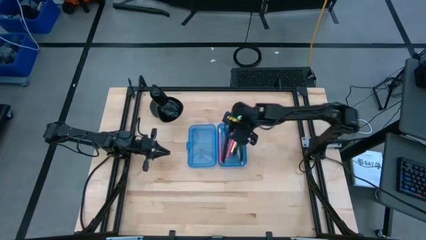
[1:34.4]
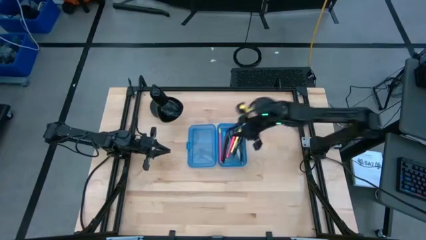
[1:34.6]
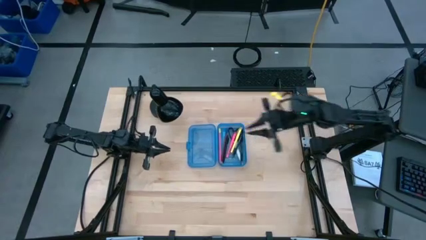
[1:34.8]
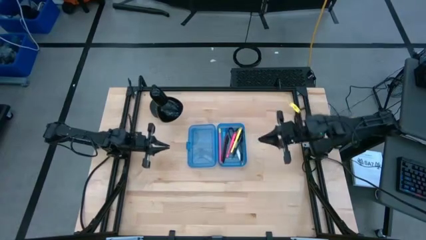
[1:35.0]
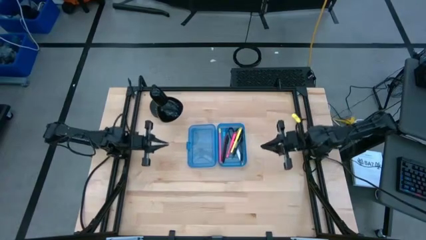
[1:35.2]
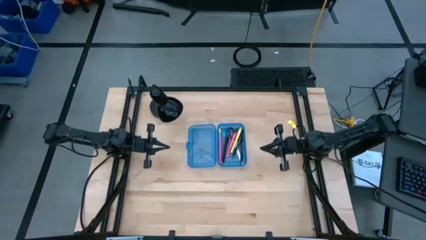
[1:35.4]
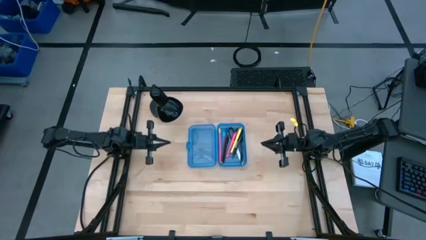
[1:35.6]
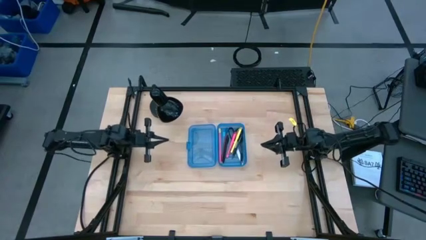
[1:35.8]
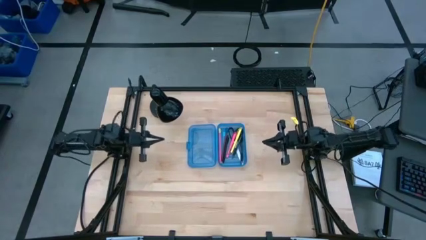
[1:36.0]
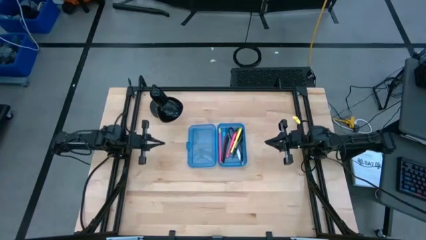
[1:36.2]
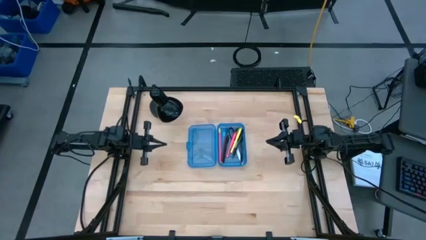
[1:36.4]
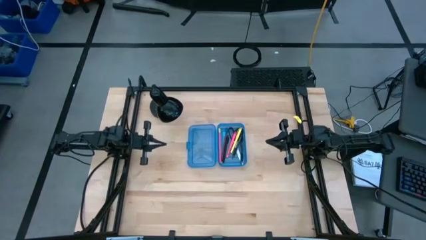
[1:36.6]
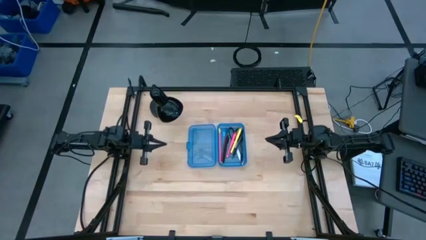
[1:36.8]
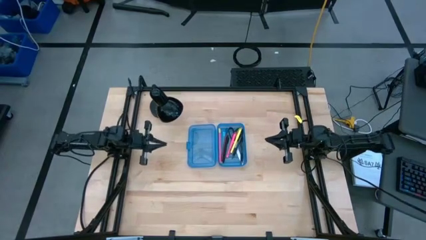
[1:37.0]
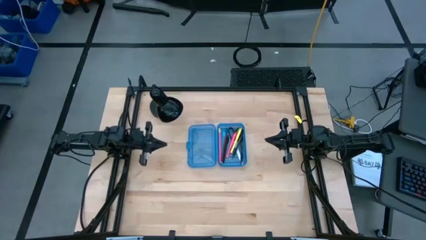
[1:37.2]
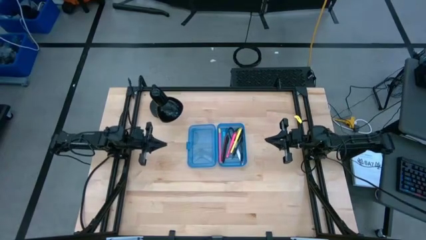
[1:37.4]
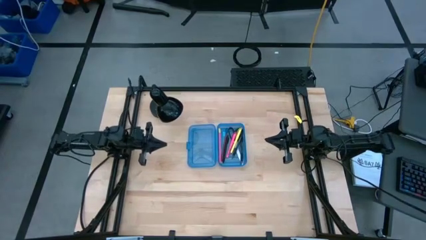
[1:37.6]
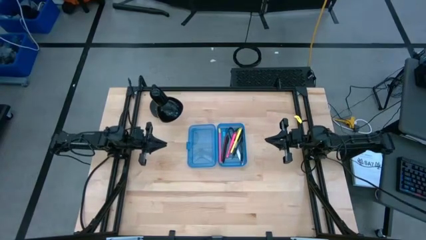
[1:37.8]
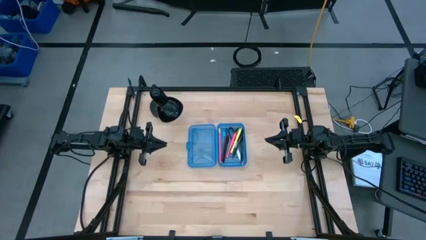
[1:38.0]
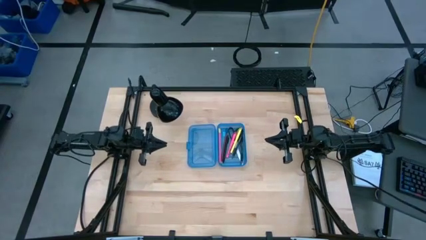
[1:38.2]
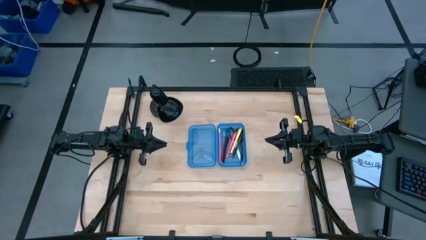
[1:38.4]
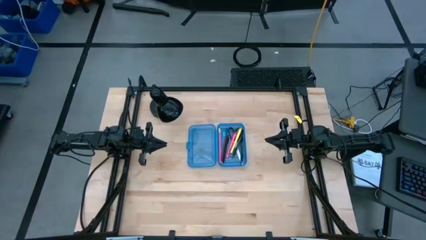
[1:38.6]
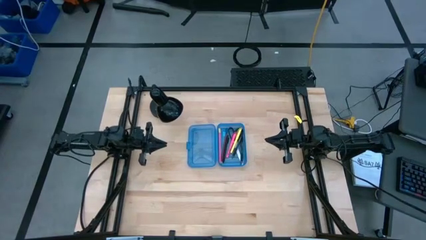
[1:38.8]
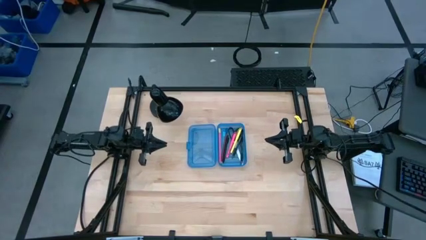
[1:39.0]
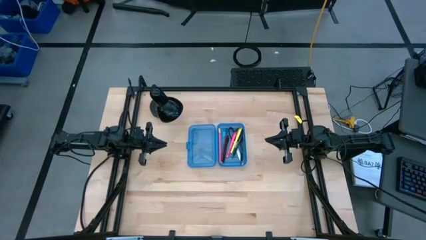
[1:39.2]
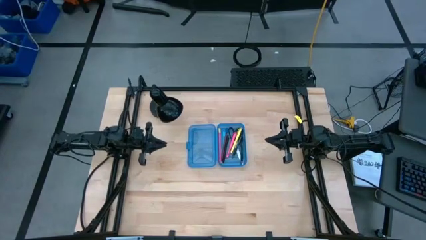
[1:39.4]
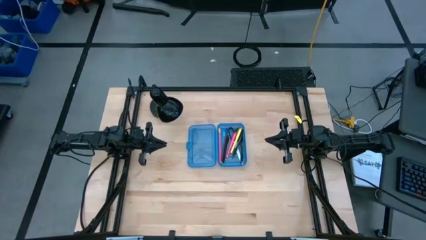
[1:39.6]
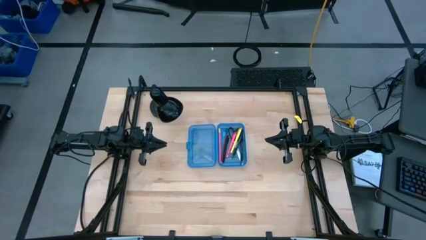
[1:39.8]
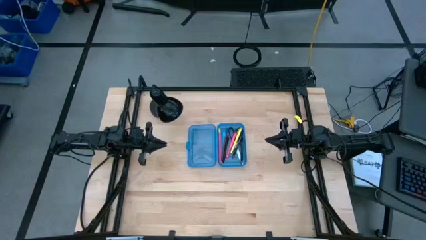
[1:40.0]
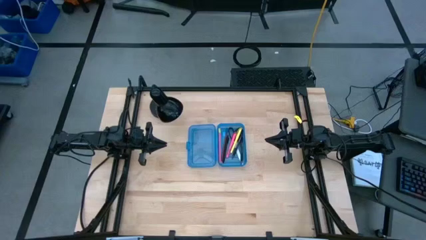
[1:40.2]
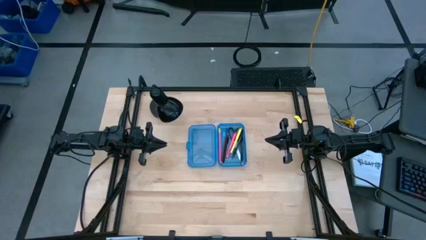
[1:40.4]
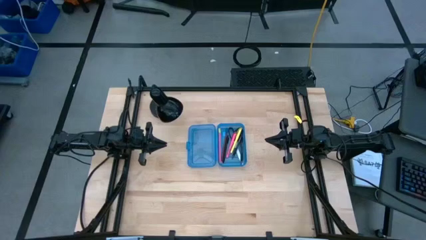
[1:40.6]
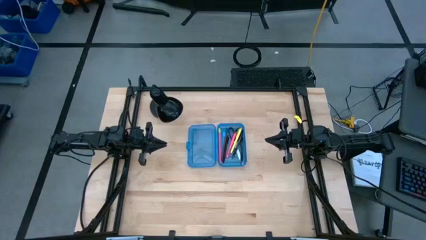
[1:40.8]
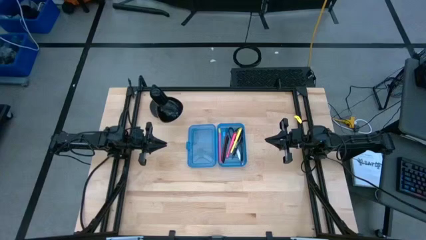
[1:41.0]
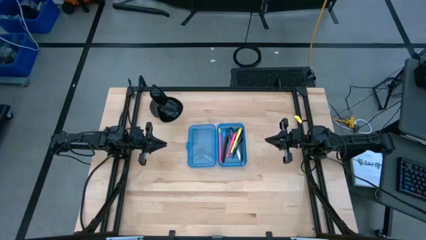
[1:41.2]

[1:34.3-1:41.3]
Task: Pick & place school supplies into a supply box
Return to Home Position

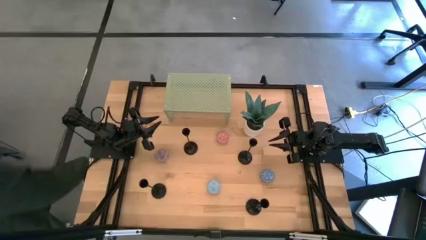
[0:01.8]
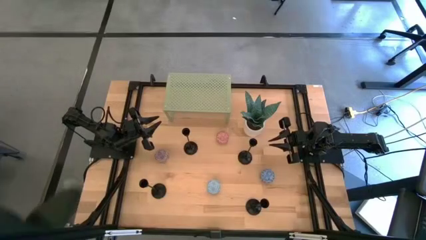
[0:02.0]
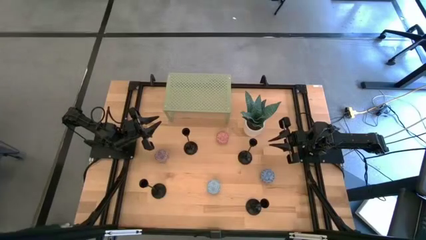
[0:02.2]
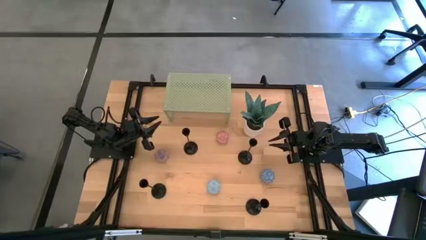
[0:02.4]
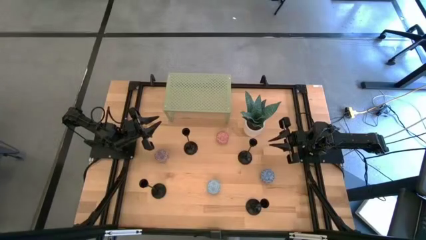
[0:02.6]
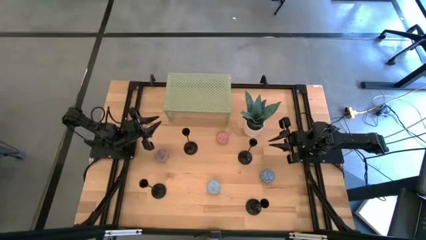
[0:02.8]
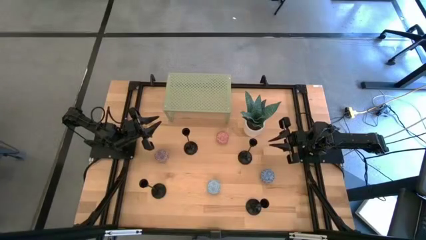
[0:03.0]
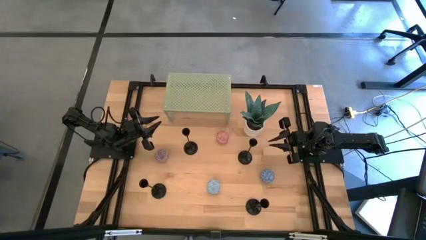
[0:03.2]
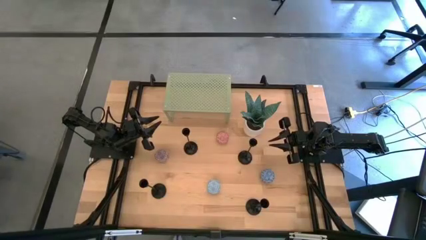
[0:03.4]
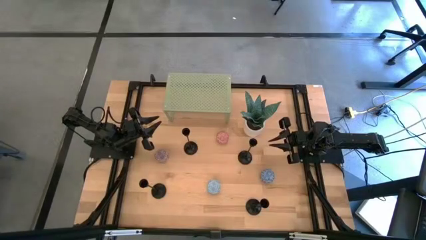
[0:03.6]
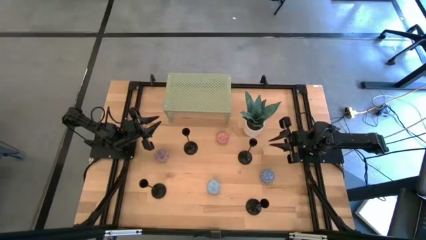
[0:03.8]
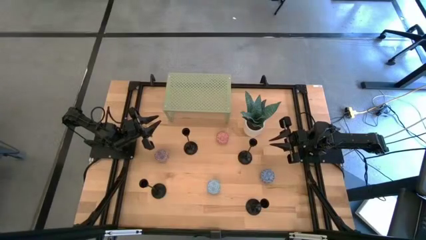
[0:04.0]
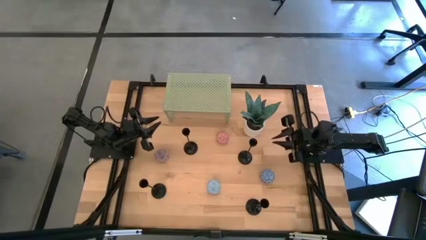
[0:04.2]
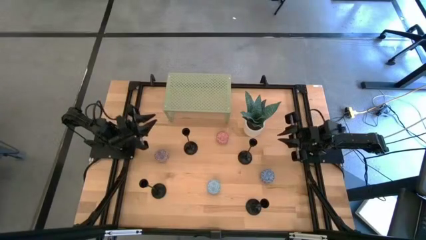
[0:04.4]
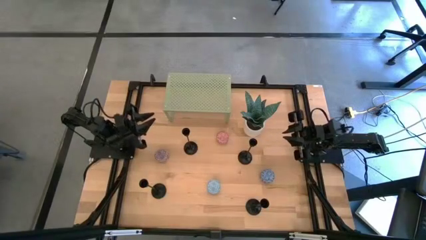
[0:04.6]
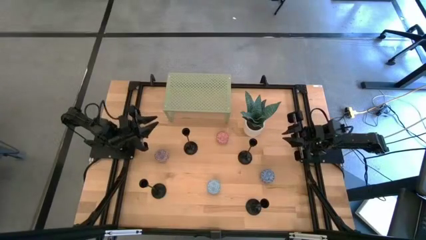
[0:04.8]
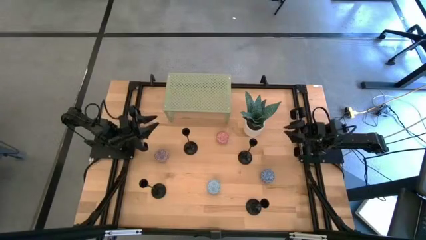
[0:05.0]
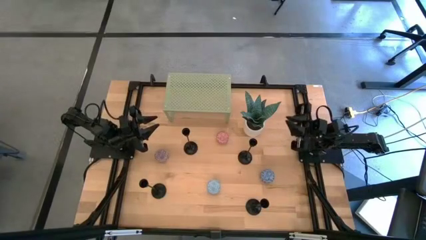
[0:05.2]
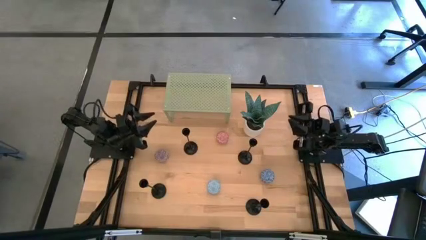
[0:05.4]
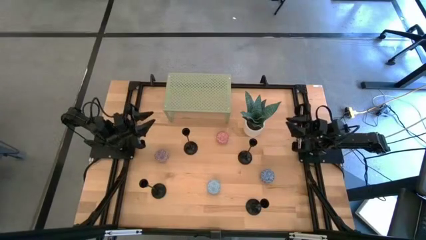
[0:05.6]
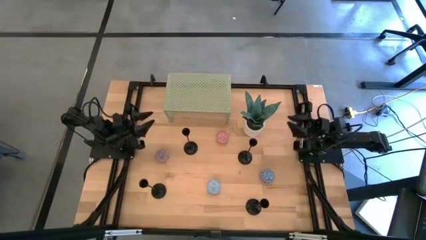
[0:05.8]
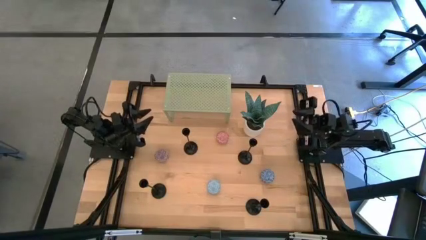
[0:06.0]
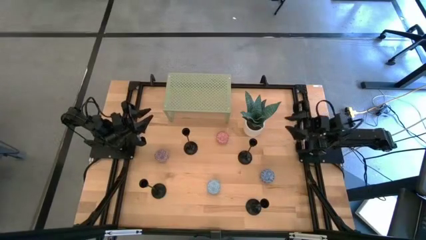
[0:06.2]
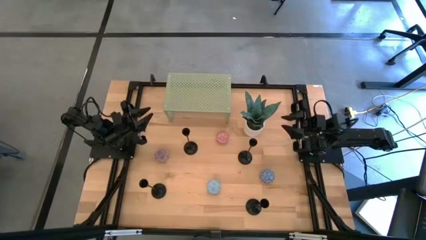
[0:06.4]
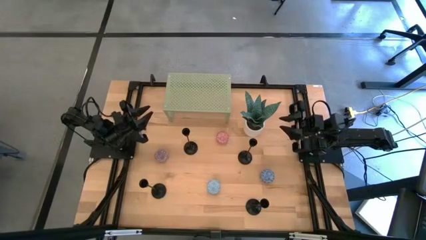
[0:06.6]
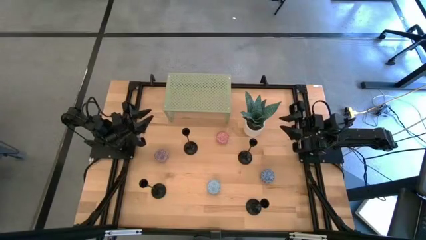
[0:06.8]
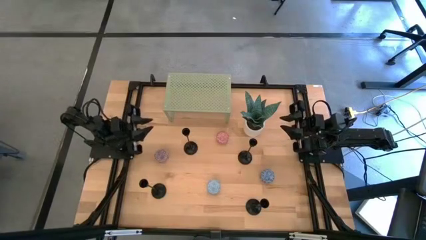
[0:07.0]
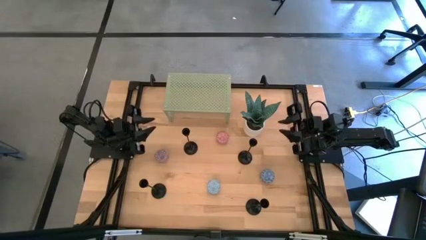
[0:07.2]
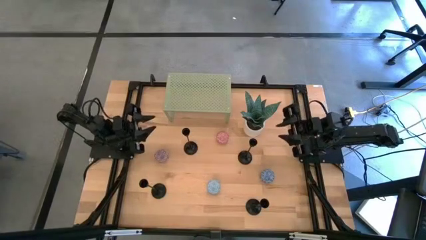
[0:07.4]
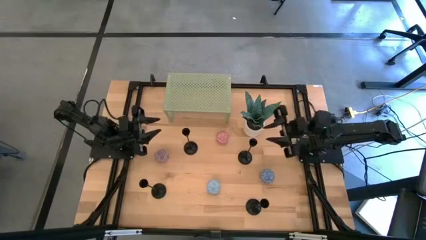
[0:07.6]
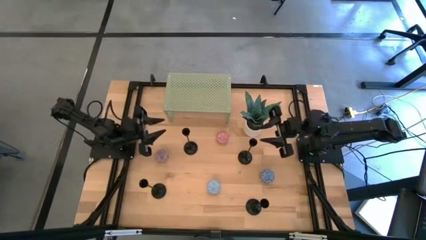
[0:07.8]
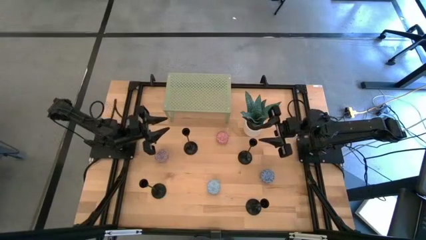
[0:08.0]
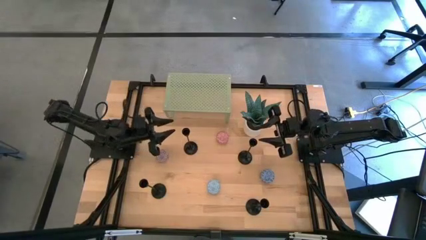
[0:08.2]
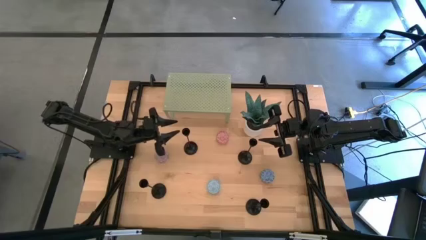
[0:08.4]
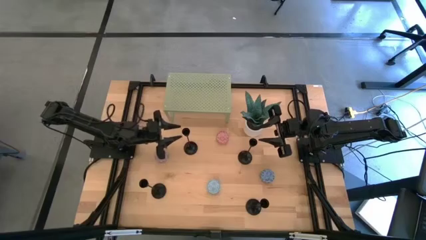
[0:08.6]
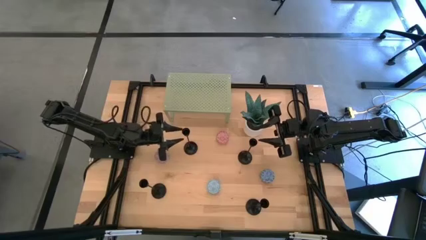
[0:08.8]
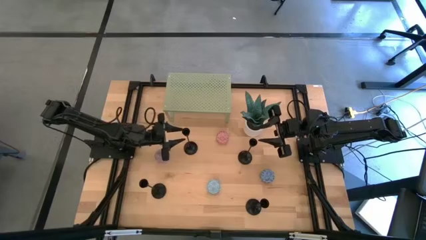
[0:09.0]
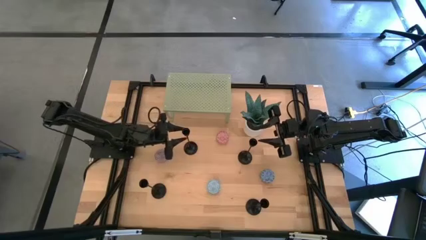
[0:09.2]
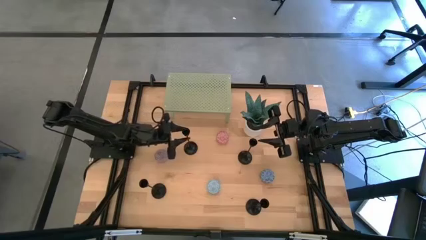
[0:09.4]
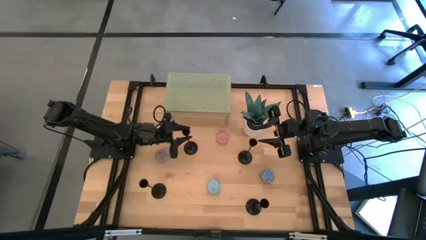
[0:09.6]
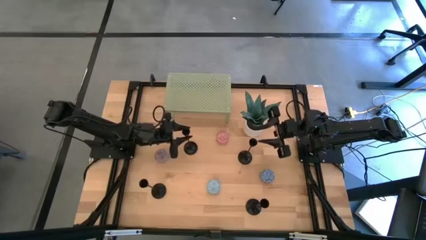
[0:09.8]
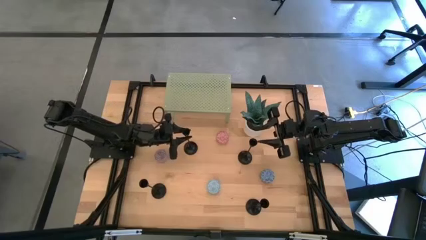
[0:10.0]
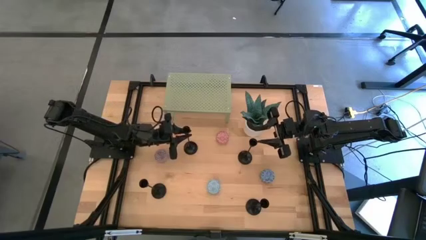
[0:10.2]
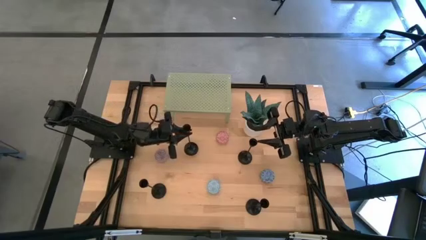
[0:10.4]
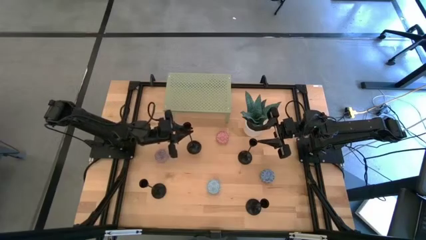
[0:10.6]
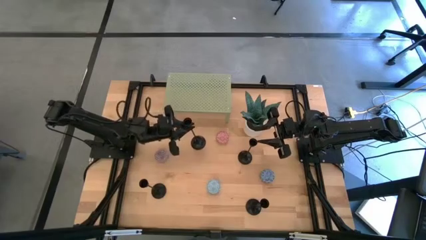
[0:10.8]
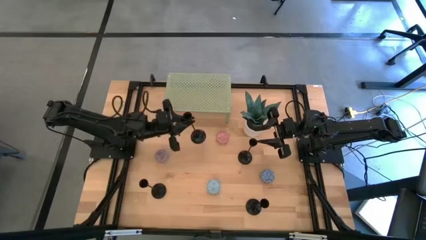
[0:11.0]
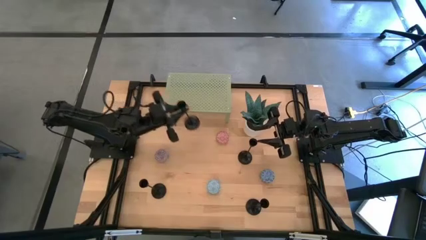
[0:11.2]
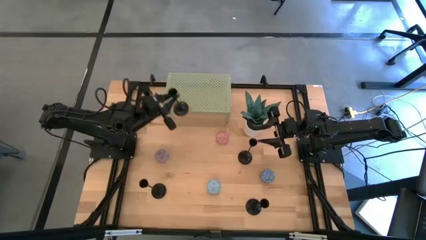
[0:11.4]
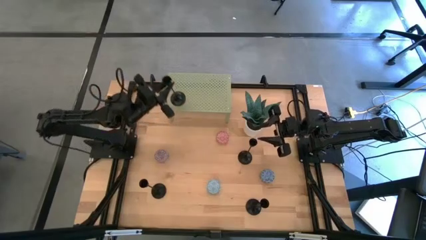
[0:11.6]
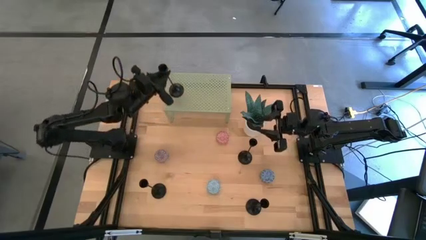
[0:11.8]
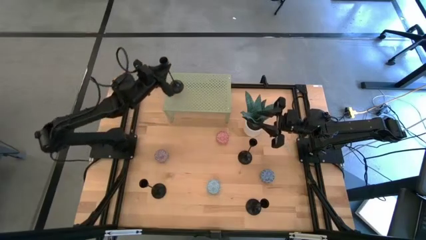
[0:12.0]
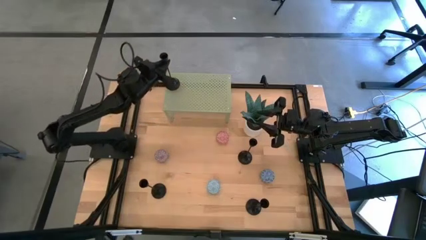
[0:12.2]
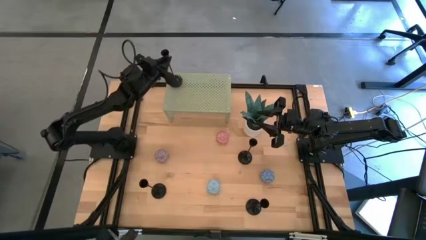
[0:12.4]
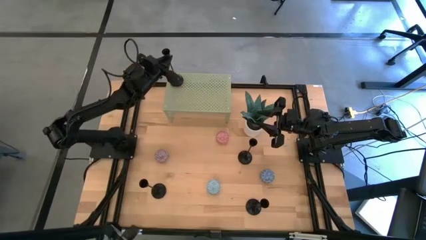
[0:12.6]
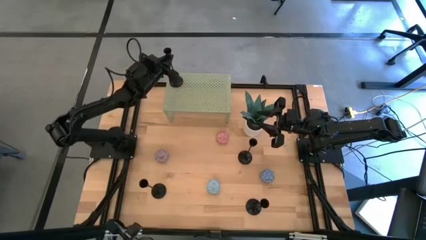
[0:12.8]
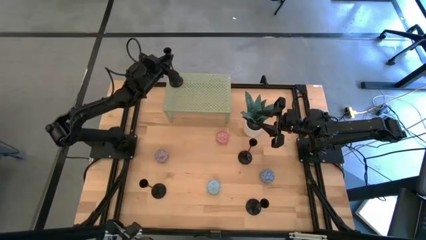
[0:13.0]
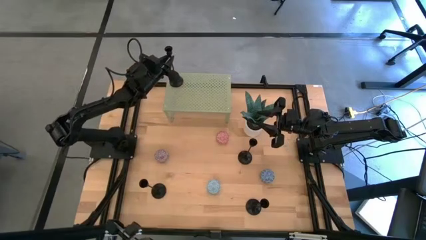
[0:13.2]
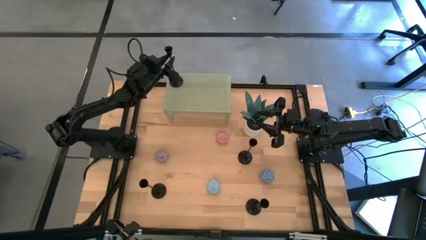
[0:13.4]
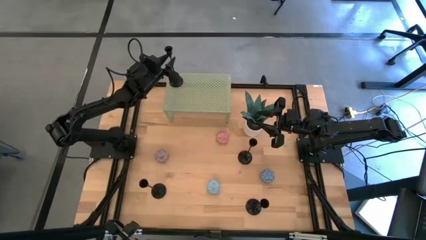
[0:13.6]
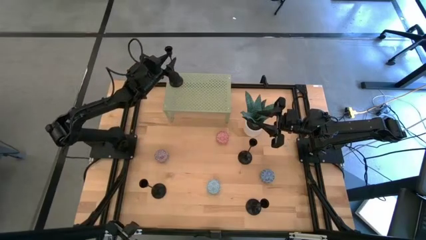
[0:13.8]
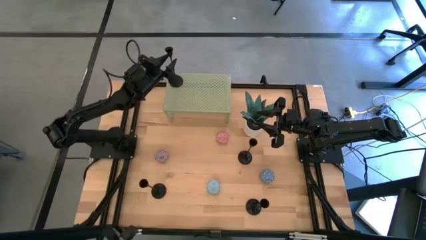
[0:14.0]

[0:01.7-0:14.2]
Task: Pick & Place candle stick holders
Put the black candle holder on the shelf
